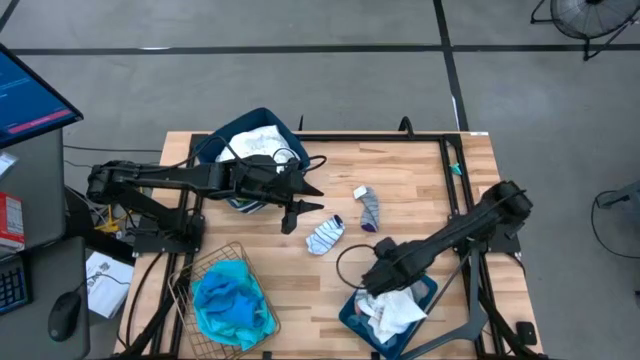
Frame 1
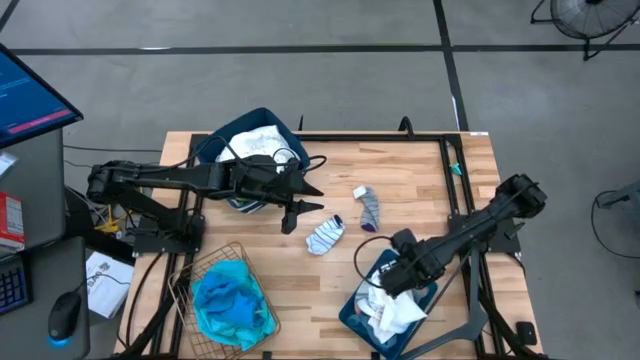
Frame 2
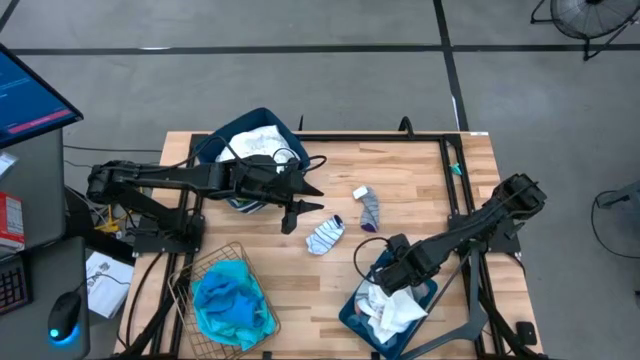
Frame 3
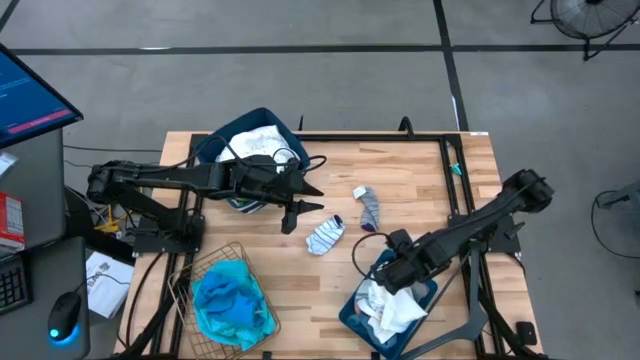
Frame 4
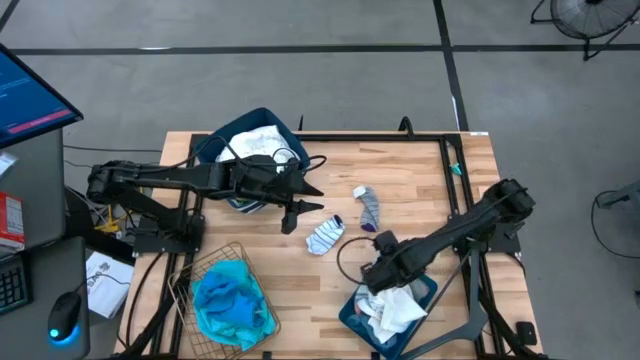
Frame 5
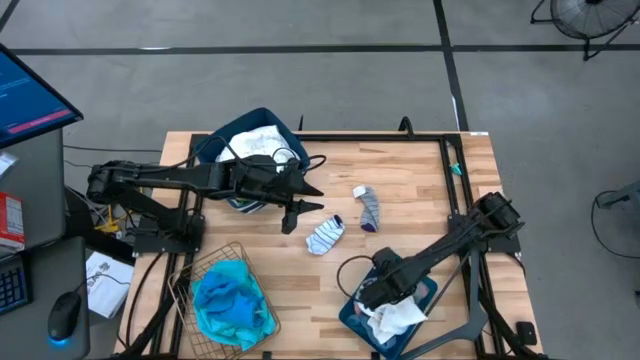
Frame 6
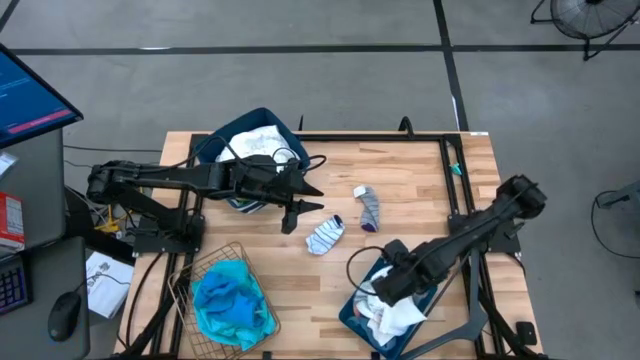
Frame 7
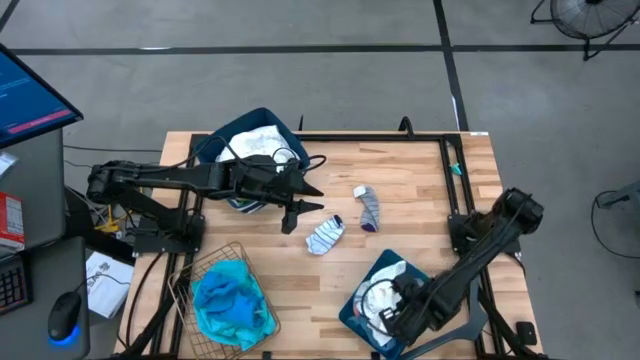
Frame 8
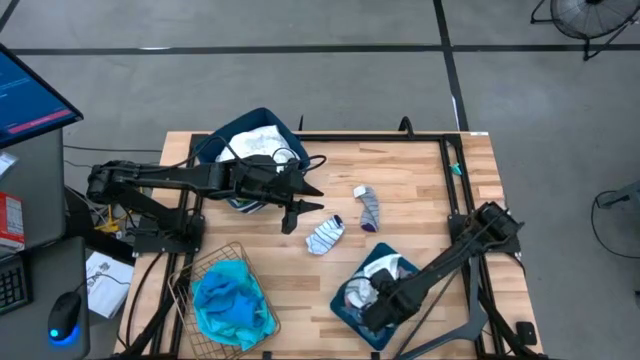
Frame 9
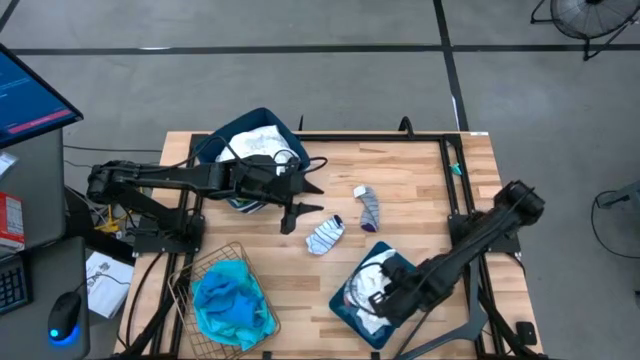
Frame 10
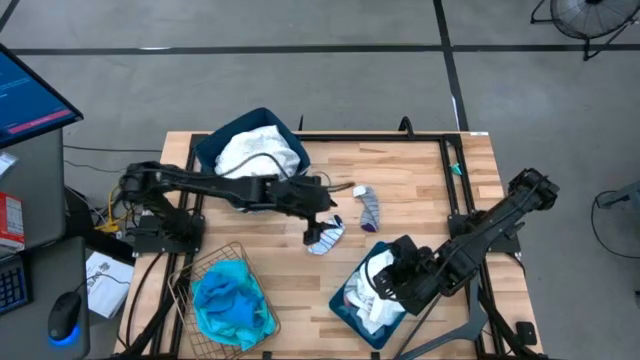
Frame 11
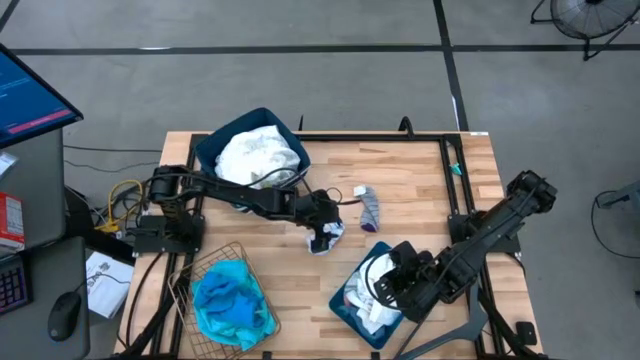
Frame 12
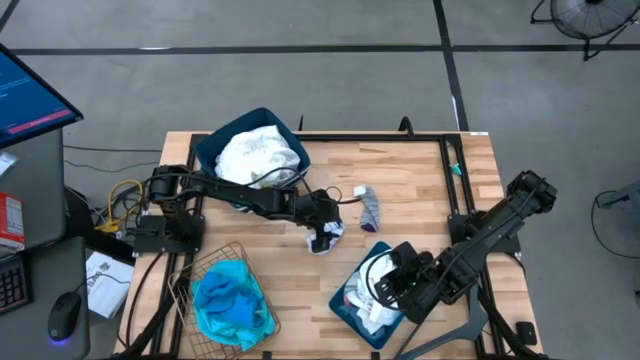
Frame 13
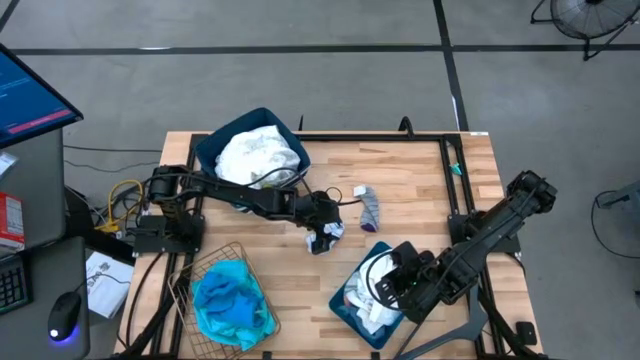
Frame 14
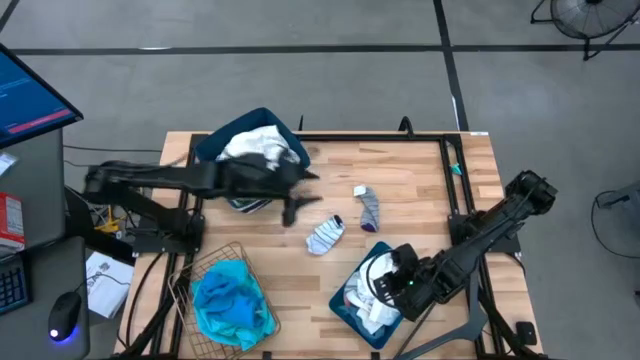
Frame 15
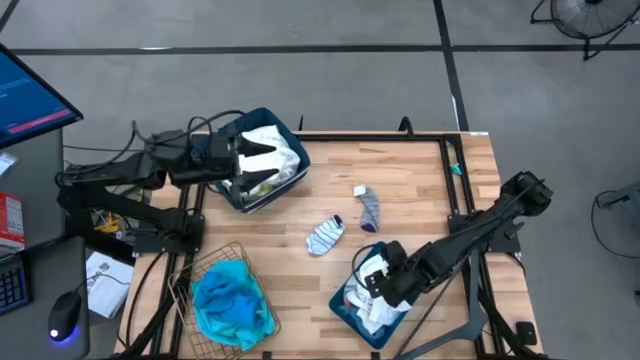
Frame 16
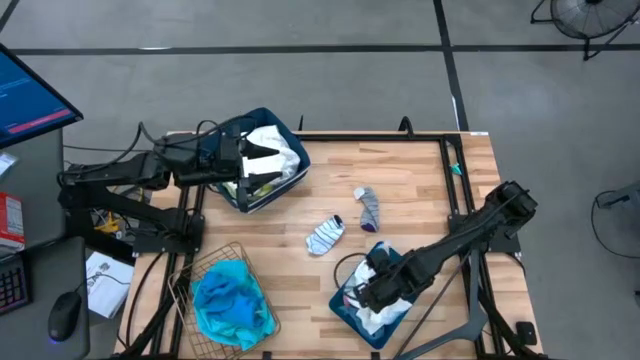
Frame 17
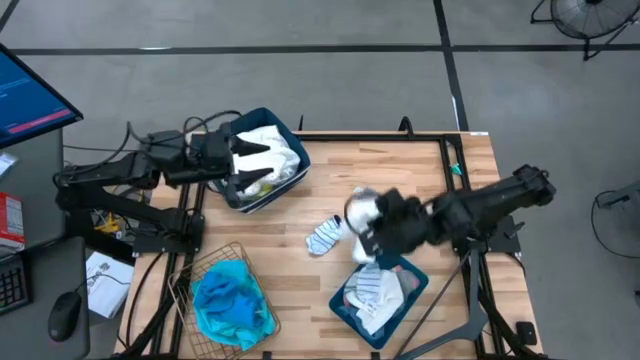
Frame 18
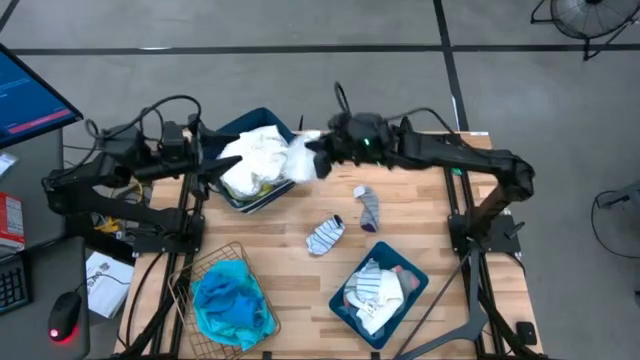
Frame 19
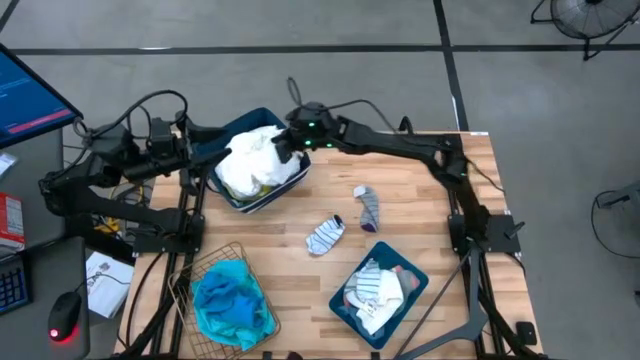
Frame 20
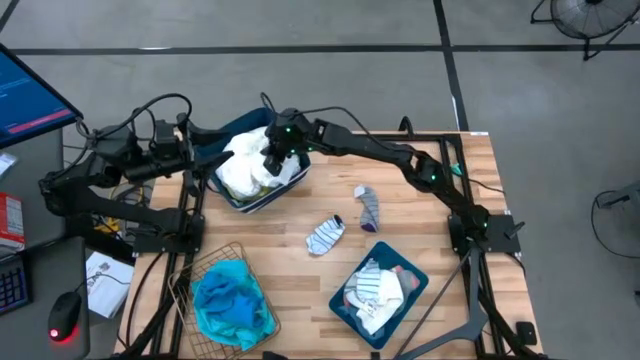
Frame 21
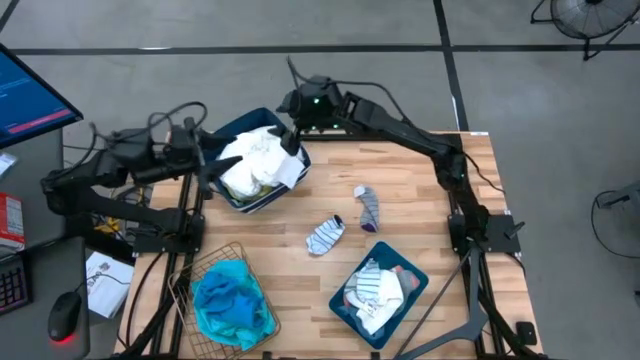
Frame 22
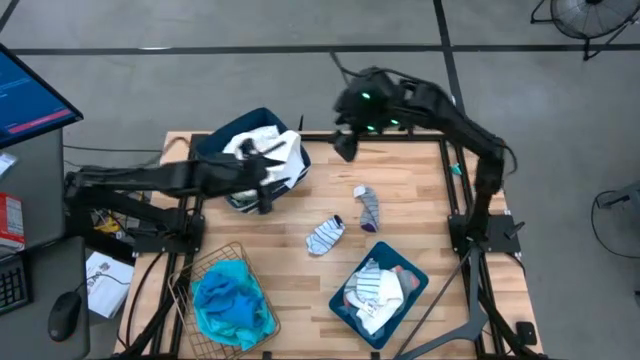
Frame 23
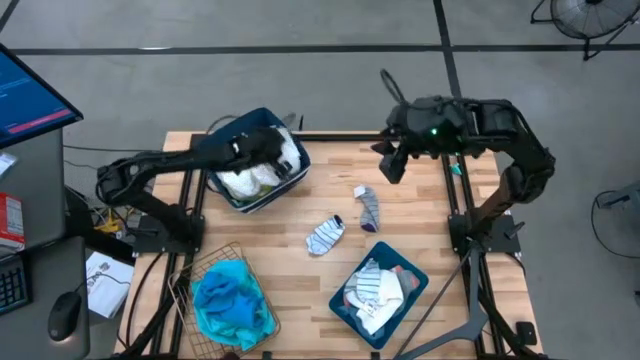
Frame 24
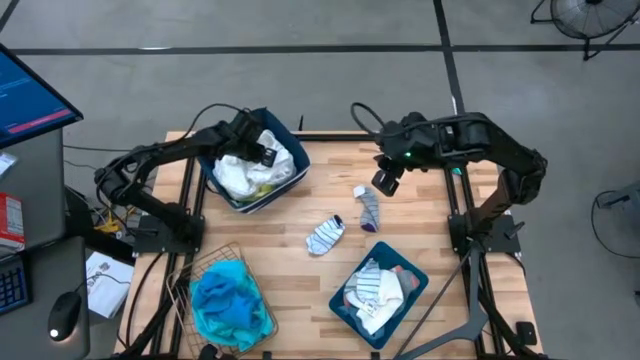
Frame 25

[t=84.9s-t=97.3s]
Task: Pick & Place Cloths
Put the white short into the wire basket

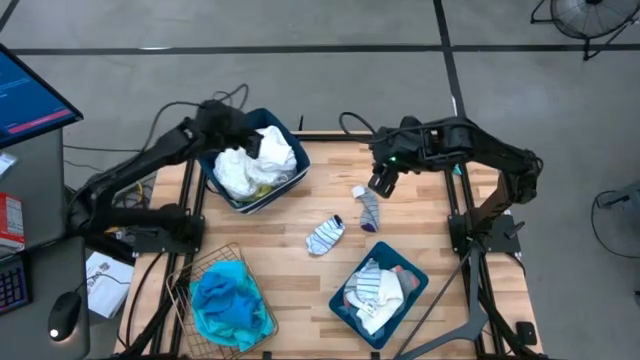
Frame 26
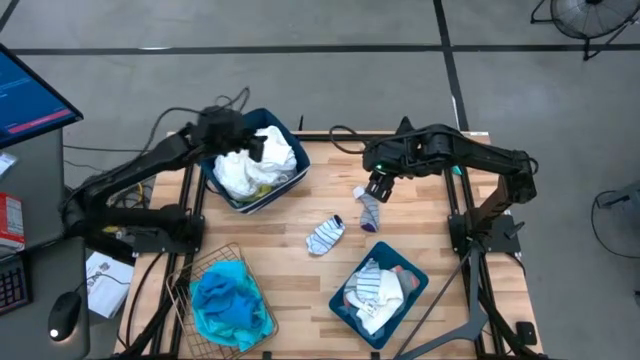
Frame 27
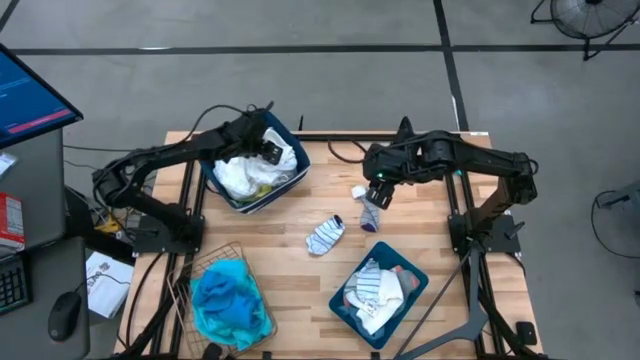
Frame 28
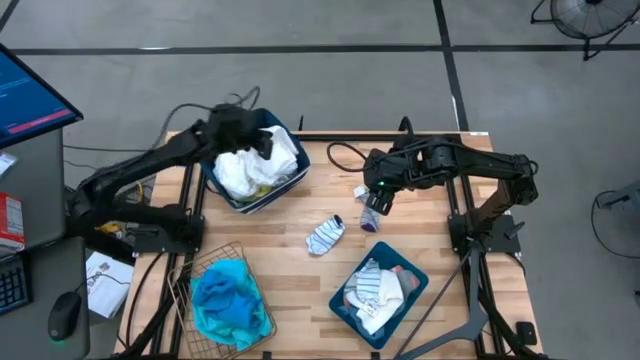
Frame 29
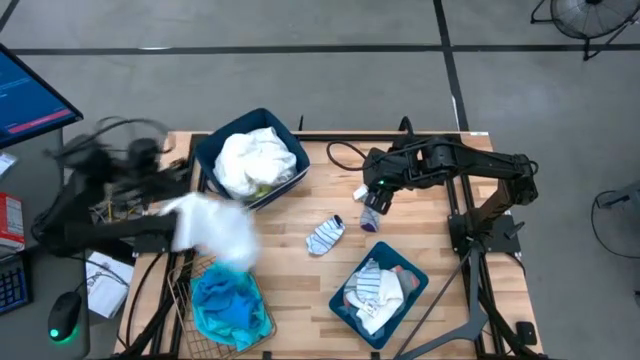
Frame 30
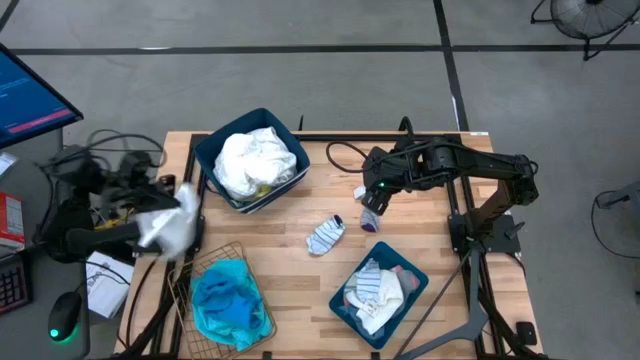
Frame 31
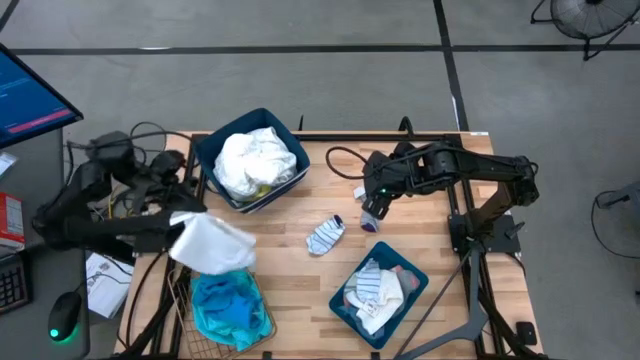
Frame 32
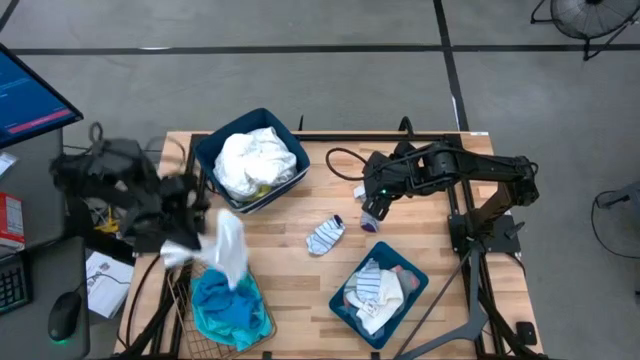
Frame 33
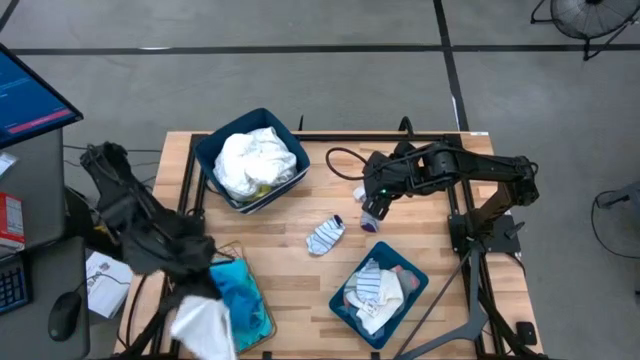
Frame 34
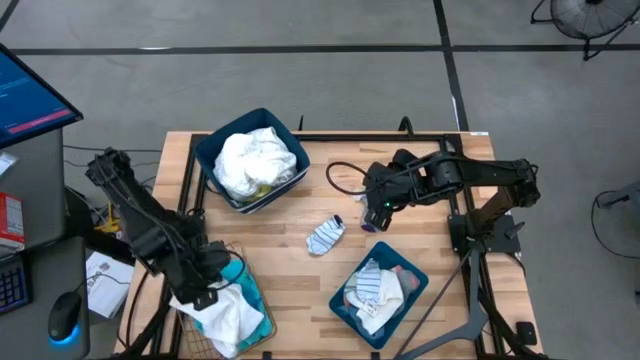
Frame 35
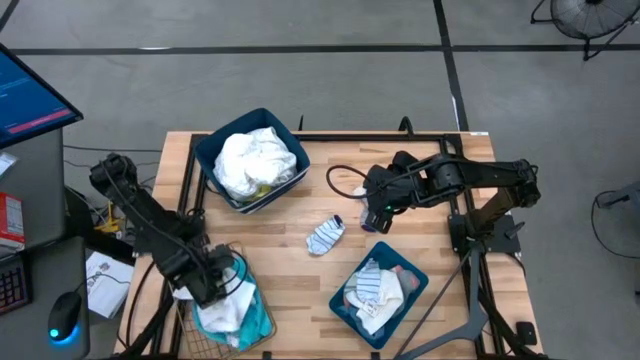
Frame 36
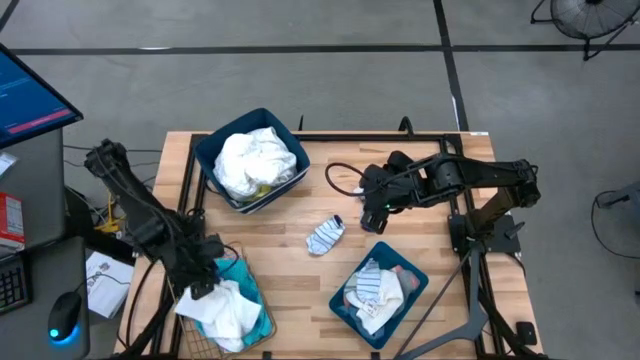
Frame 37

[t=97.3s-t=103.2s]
Put the white short into the wire basket

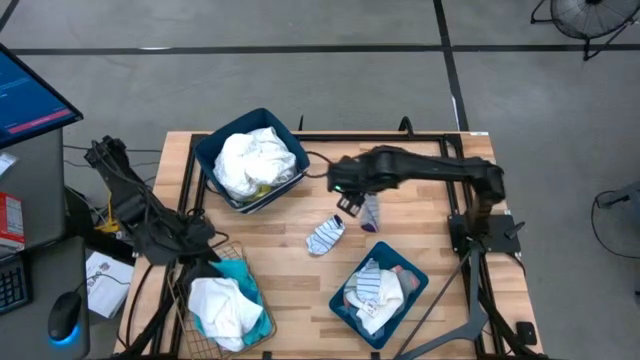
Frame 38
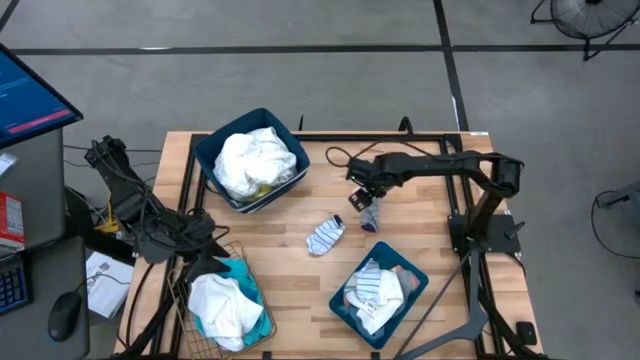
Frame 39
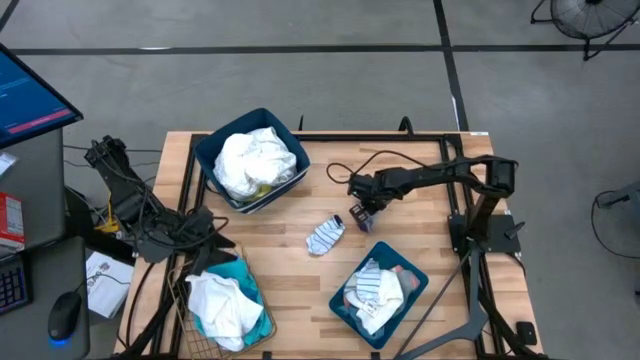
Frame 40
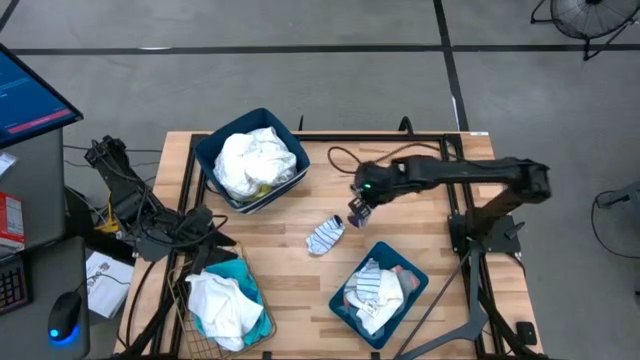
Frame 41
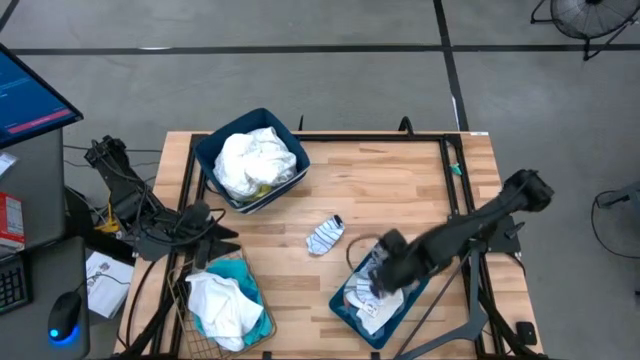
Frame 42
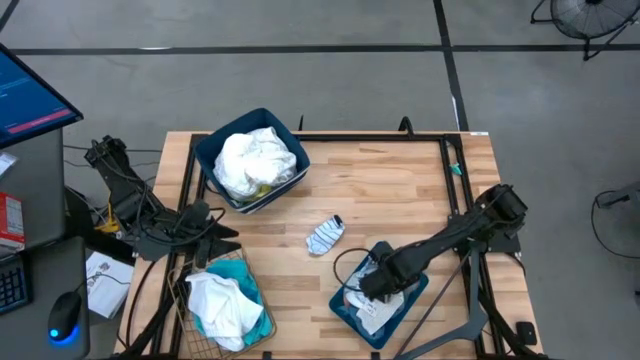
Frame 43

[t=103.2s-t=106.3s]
Put the gray patterned sock into the blue bin

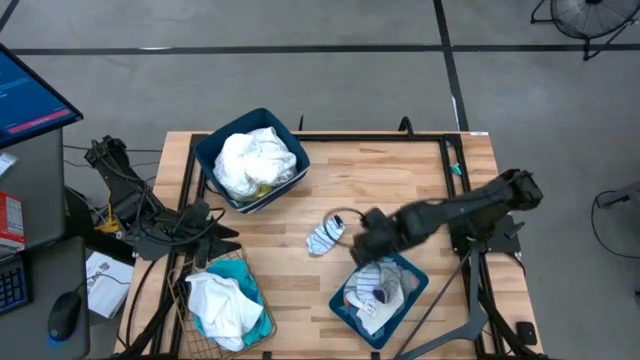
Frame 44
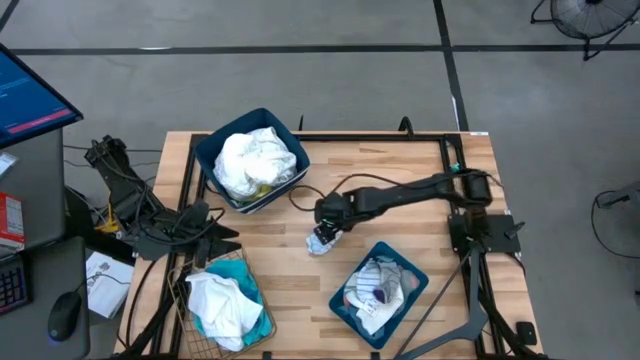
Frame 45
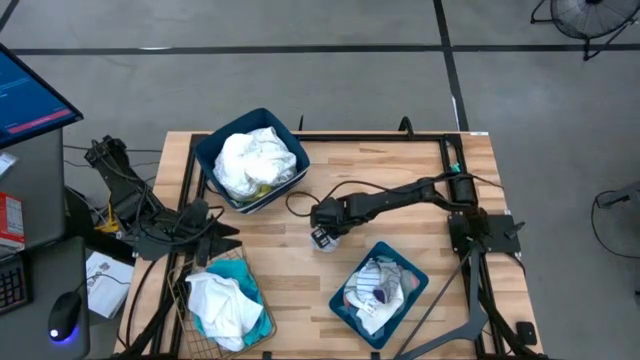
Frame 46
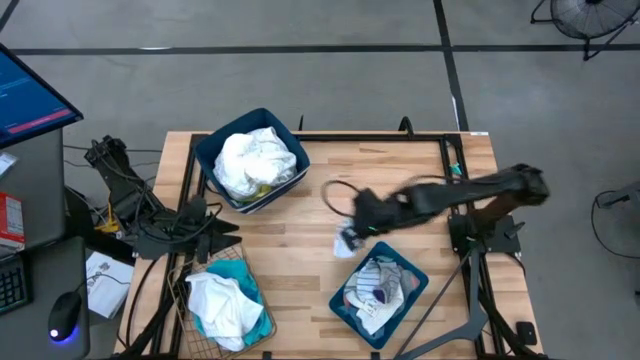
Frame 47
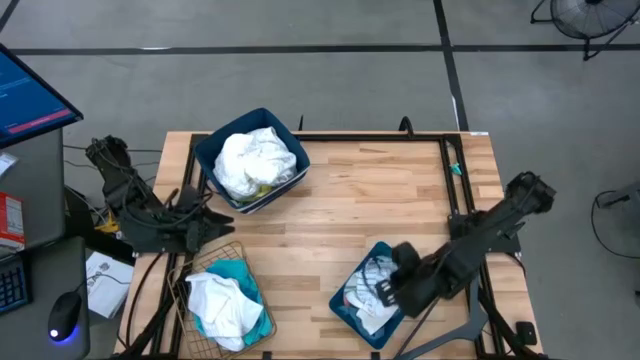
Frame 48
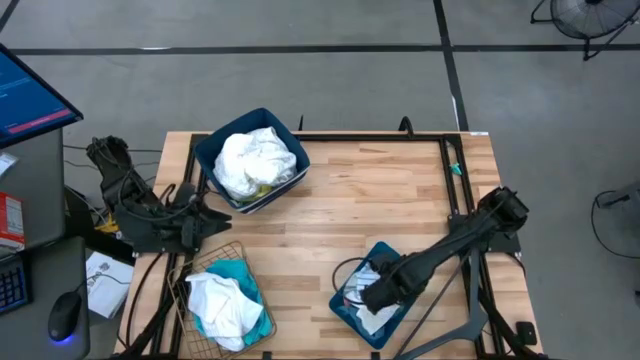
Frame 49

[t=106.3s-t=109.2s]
Put the white patterned sock into the blue bin
